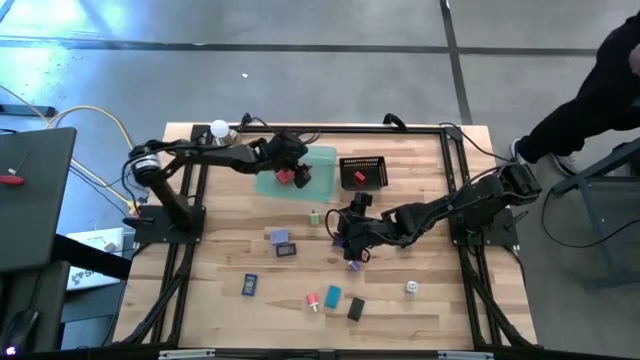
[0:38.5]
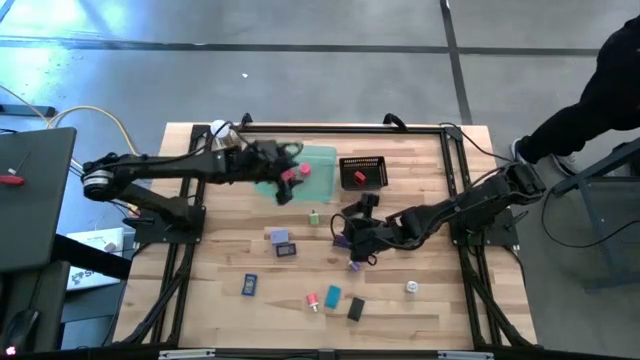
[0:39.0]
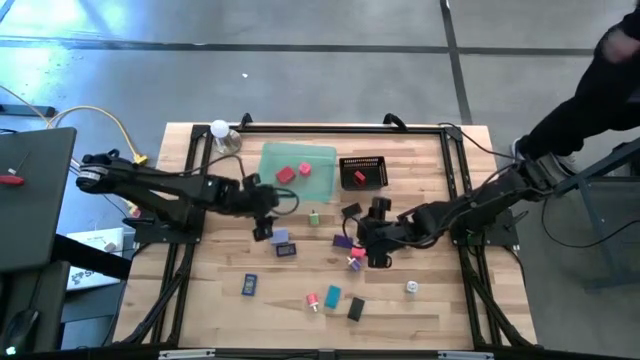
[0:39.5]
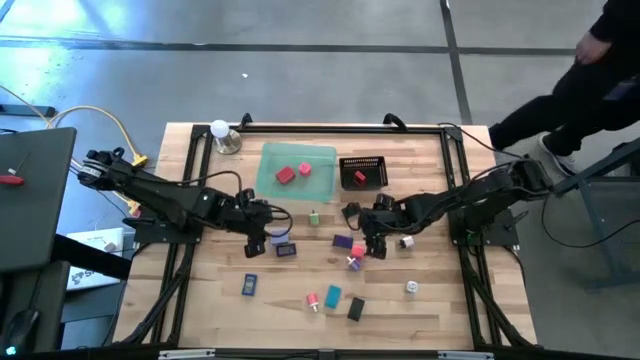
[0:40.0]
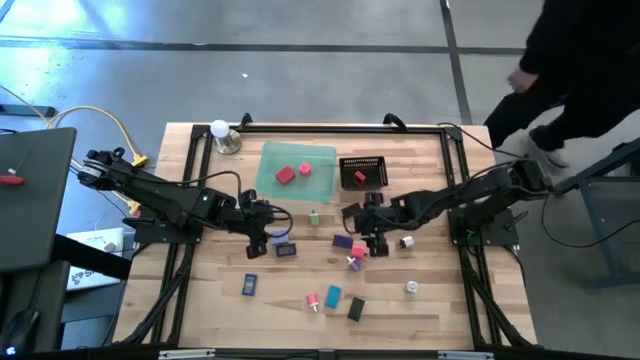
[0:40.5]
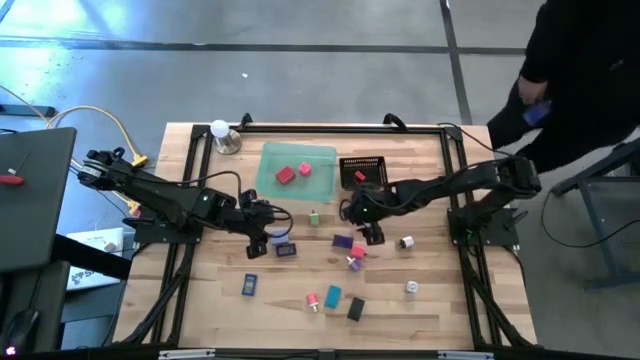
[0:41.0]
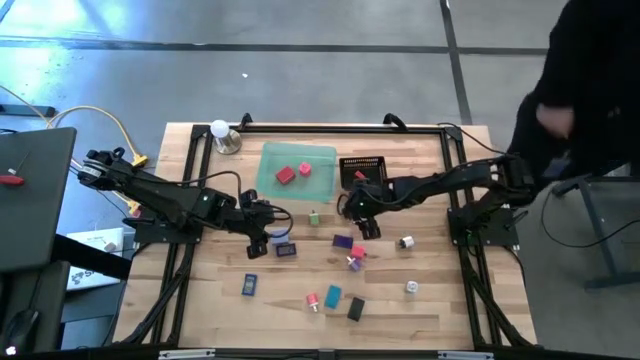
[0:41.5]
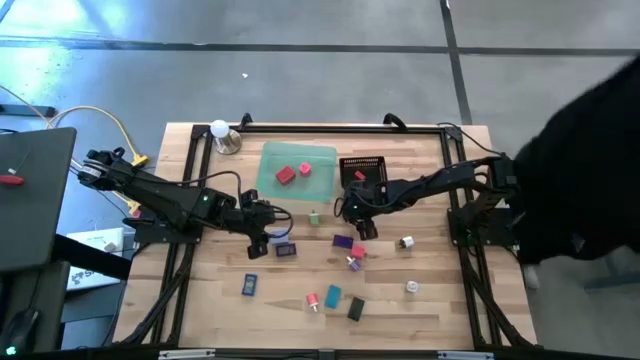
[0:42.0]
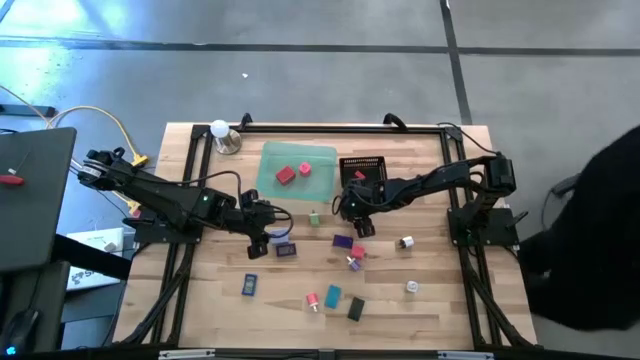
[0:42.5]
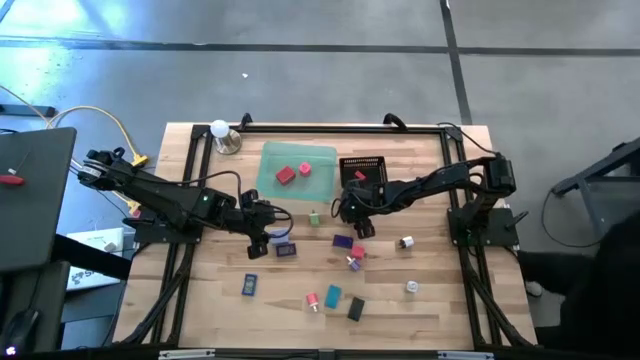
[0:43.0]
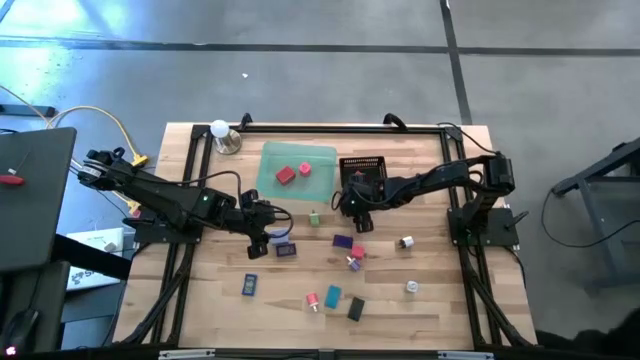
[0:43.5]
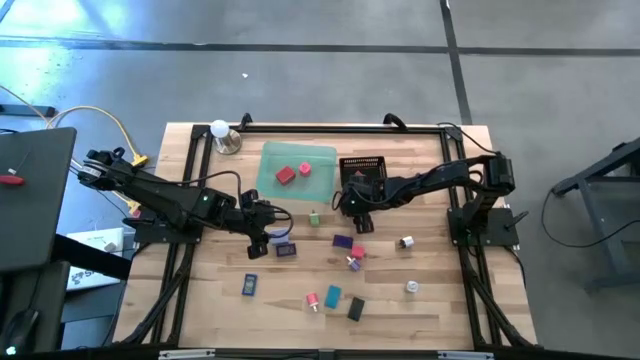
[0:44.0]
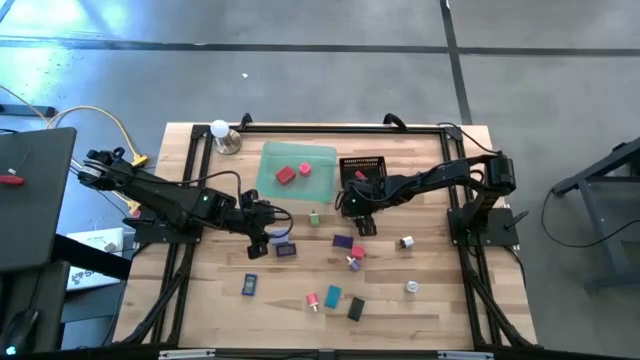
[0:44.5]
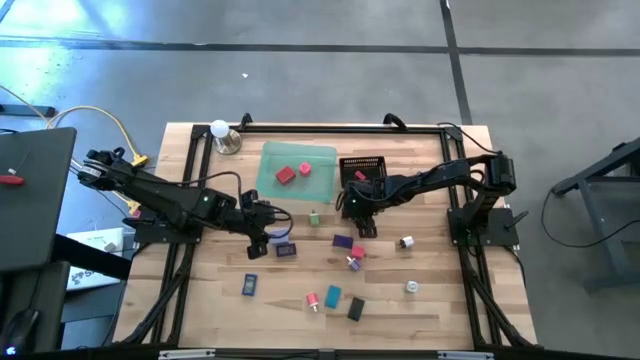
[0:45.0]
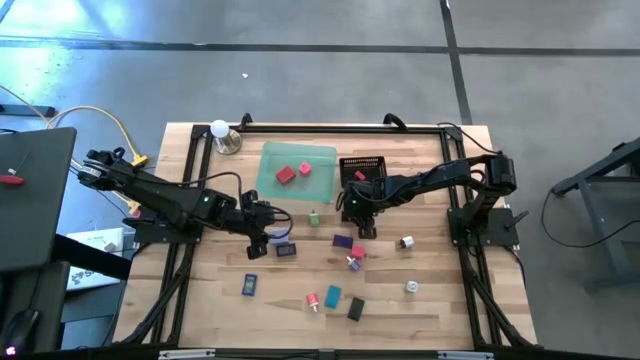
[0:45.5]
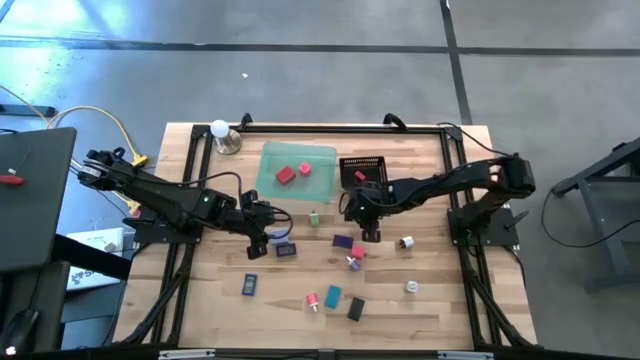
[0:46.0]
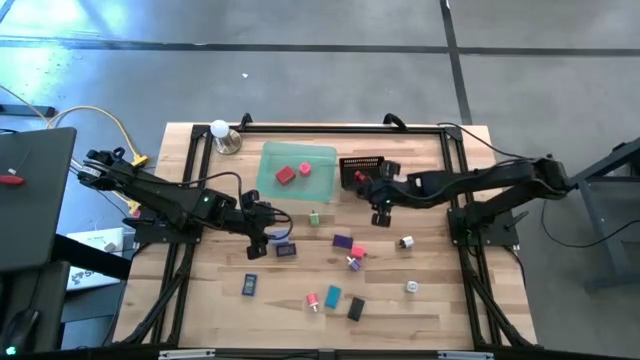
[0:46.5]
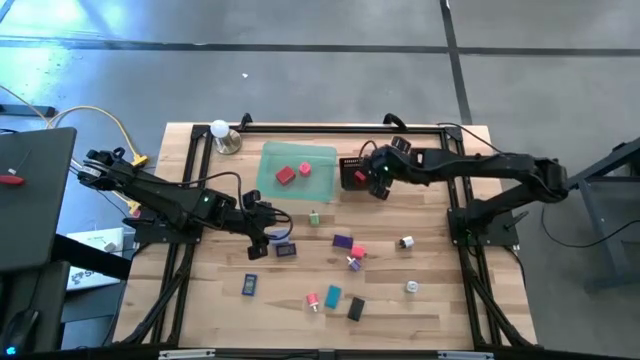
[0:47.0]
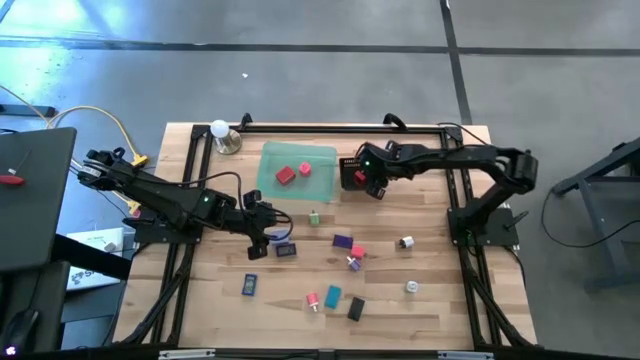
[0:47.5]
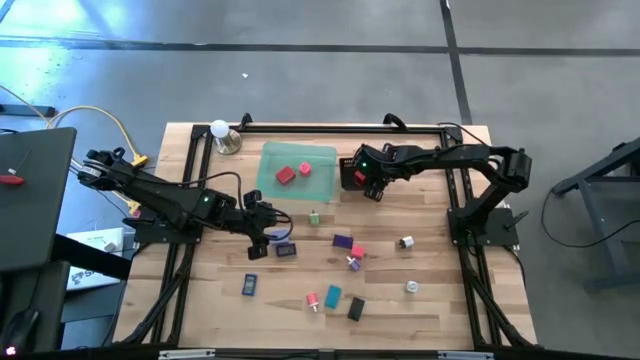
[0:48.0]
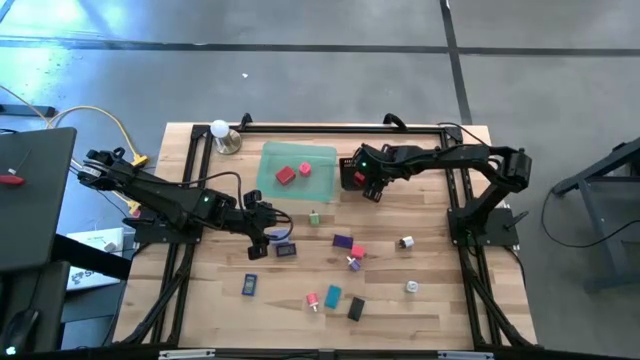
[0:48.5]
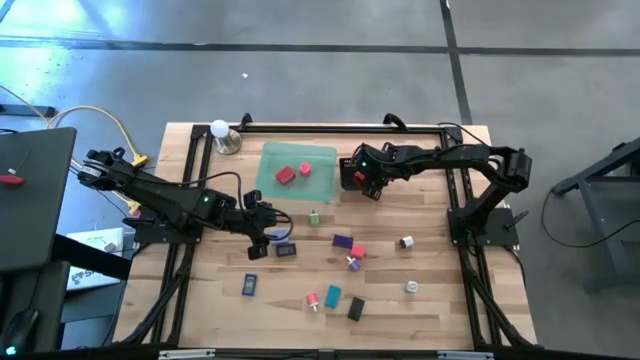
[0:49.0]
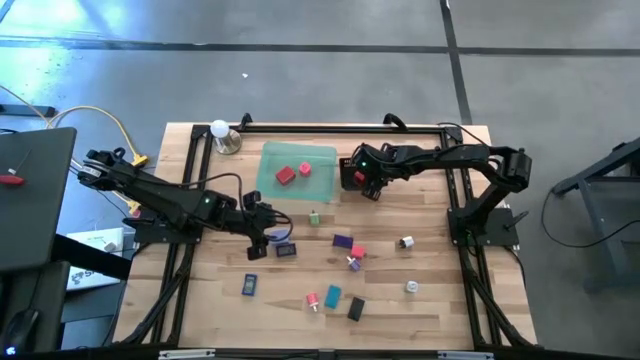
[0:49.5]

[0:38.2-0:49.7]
Task: Pick & Place Office items
Put the top black digital timer into the black bin

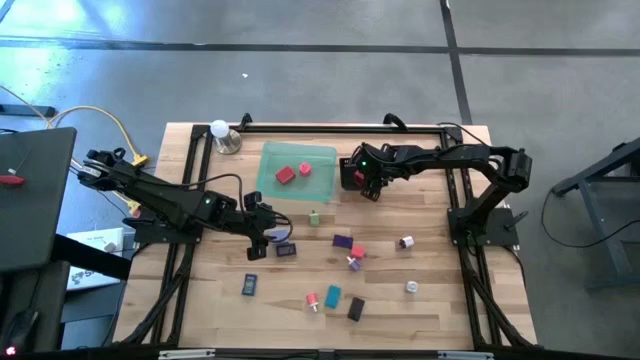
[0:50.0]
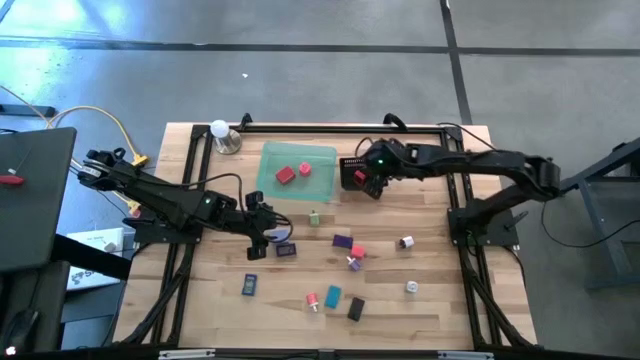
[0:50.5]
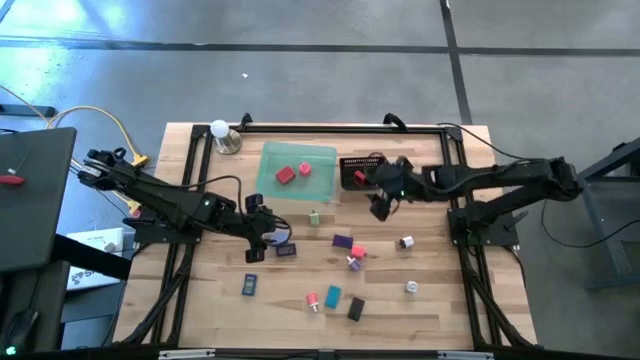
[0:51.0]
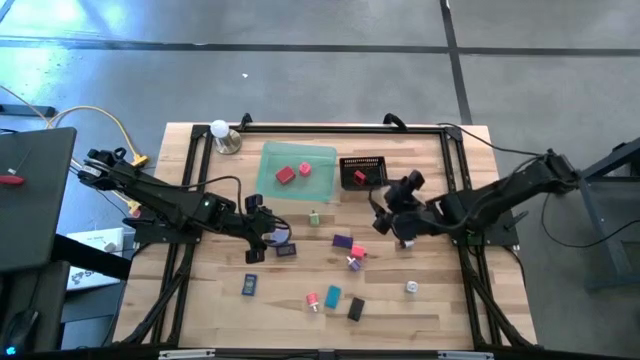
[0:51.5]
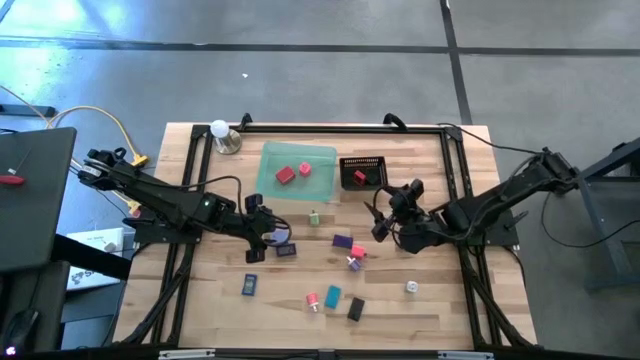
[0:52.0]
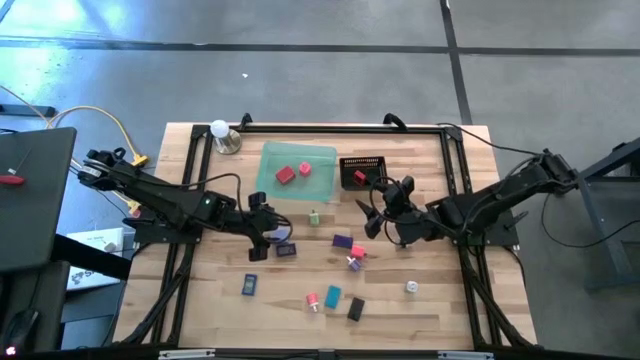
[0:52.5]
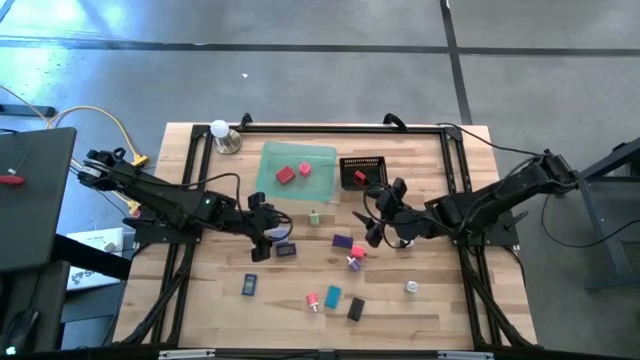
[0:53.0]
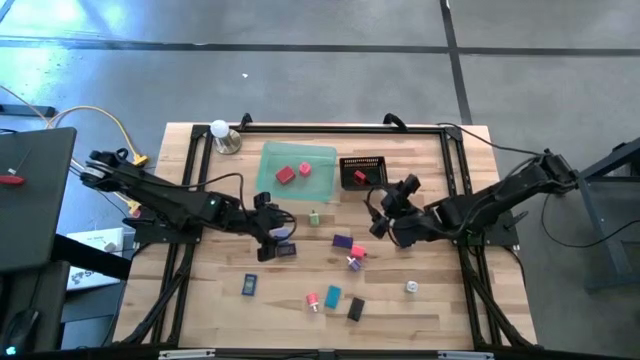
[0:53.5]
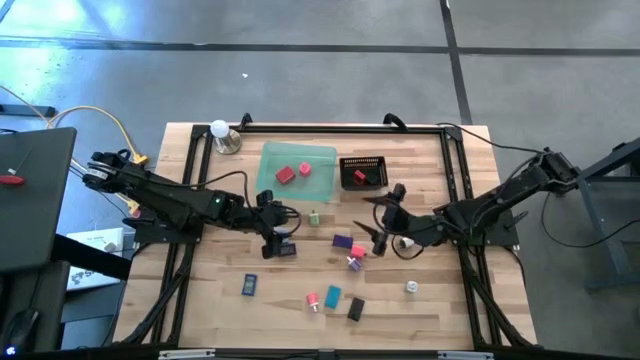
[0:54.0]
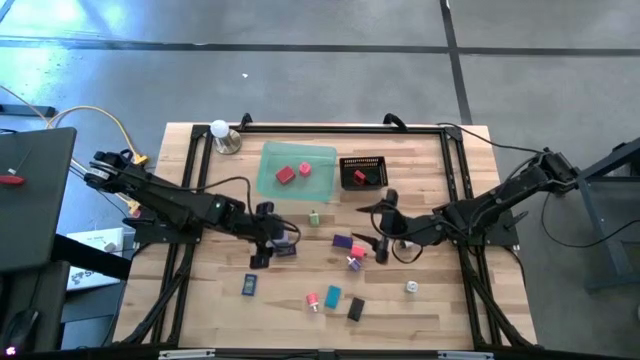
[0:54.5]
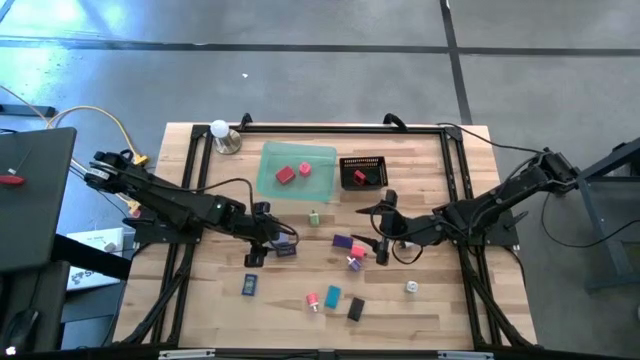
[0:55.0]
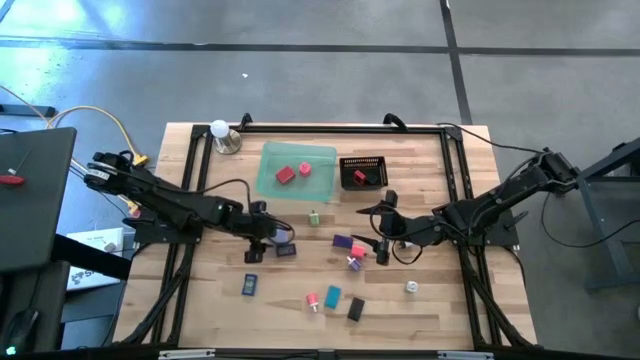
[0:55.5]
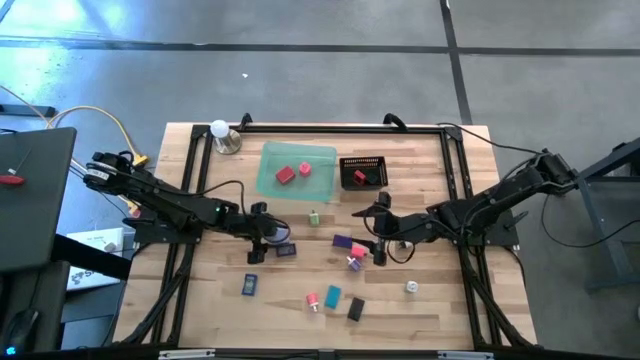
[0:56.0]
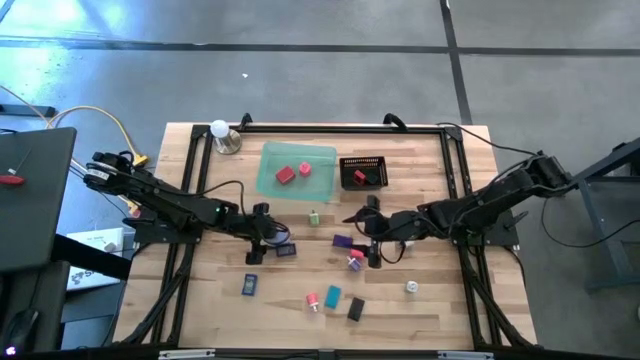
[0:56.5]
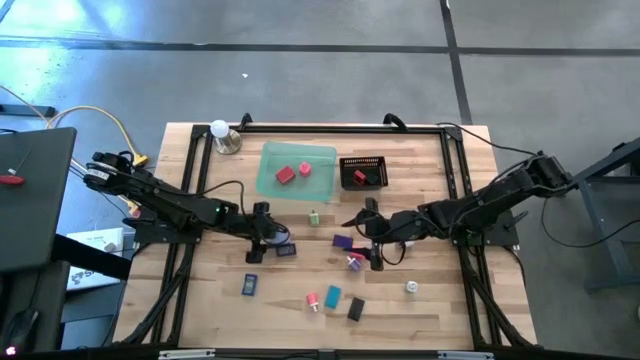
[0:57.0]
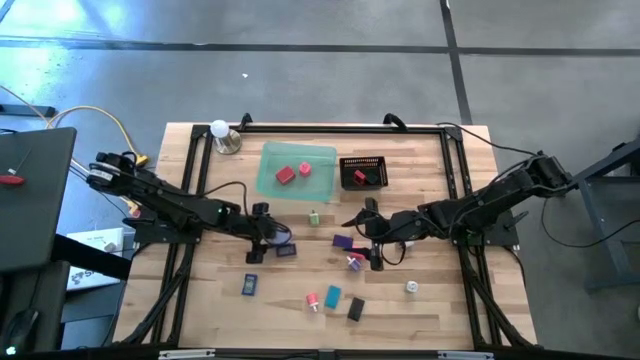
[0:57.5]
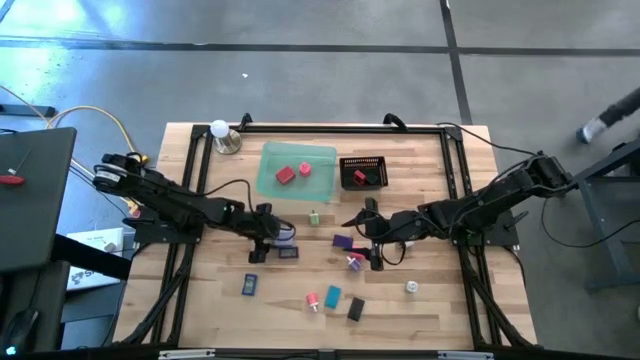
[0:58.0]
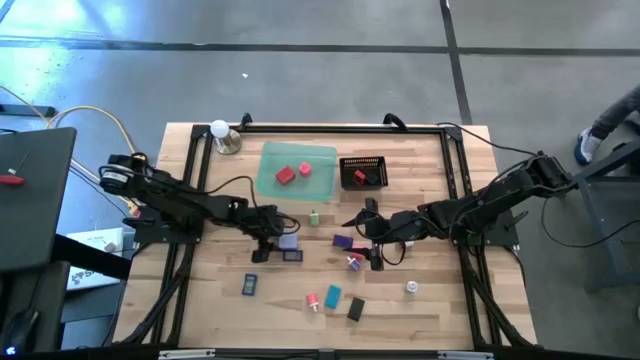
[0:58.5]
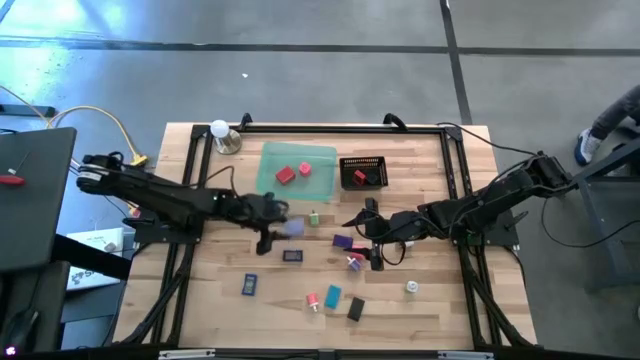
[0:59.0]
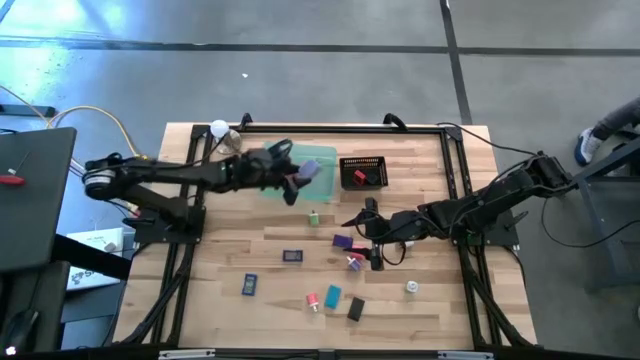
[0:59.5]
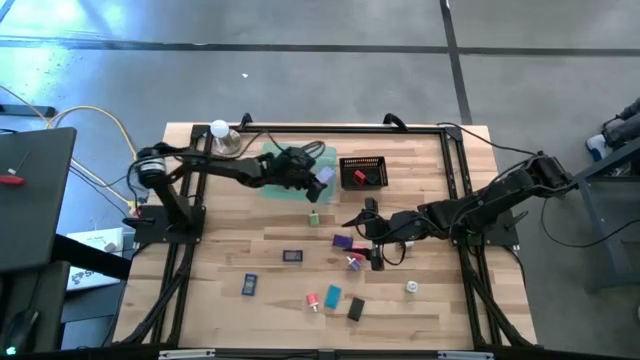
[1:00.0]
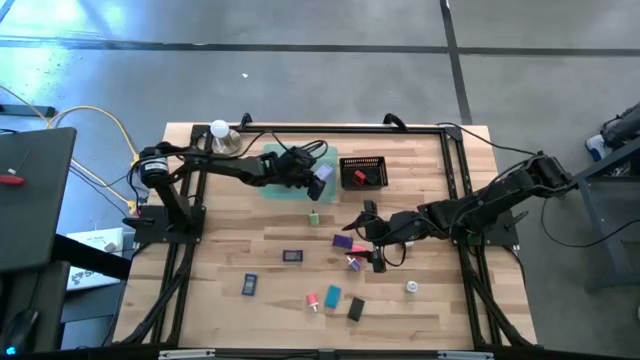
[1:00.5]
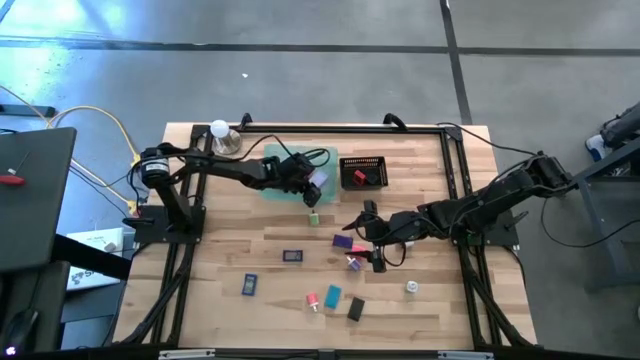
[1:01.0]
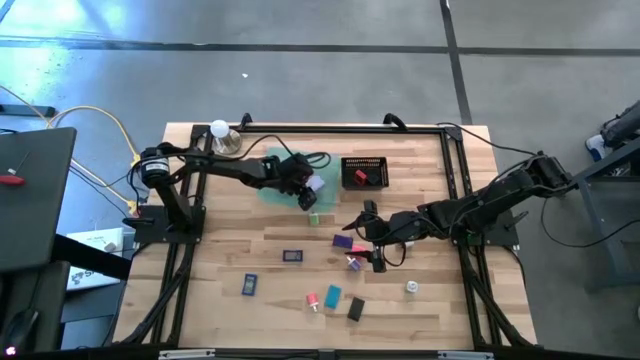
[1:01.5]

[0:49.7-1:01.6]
Put the light purple charger adapter into the green bin
